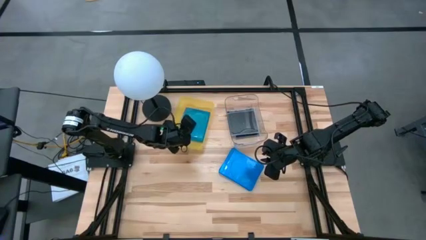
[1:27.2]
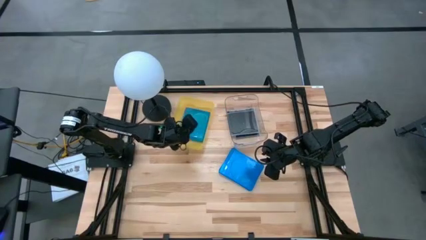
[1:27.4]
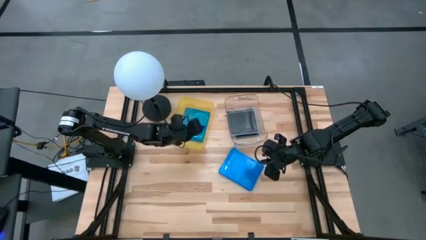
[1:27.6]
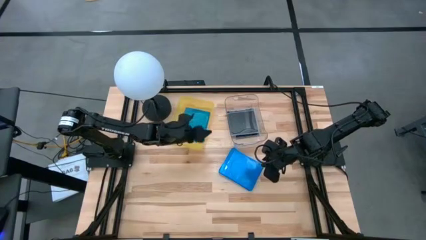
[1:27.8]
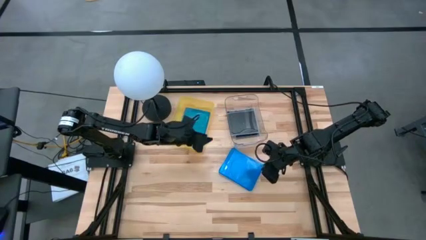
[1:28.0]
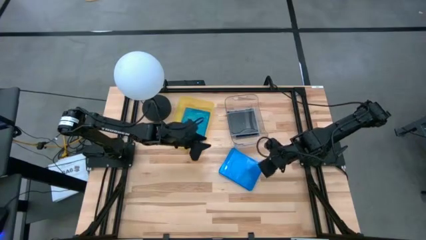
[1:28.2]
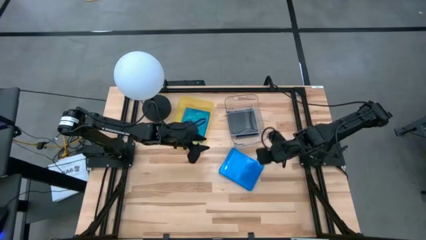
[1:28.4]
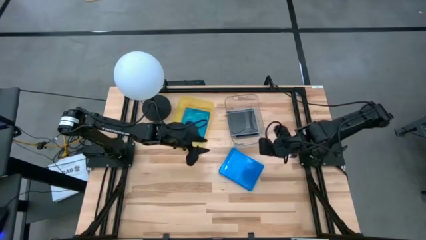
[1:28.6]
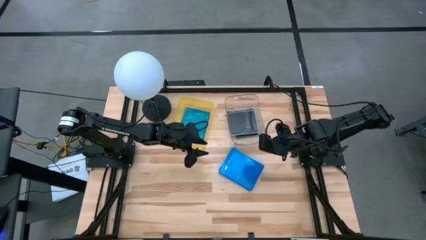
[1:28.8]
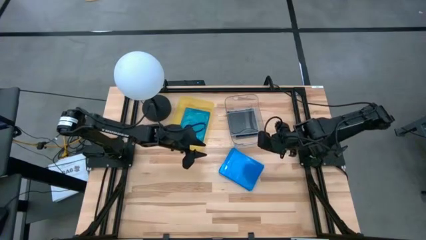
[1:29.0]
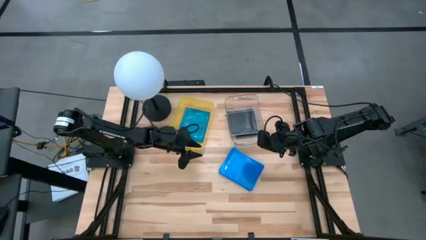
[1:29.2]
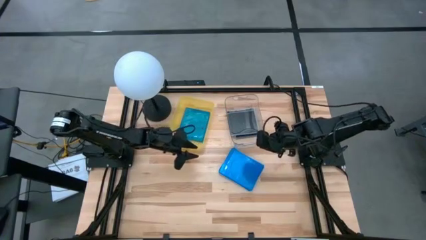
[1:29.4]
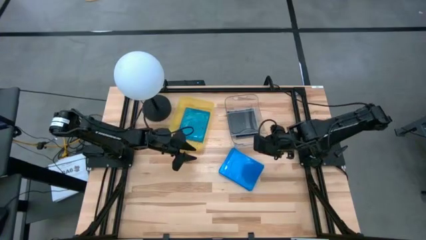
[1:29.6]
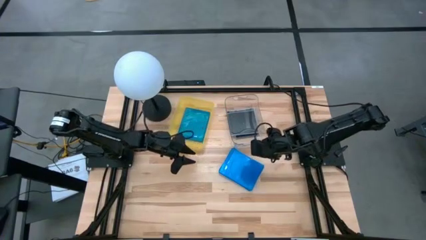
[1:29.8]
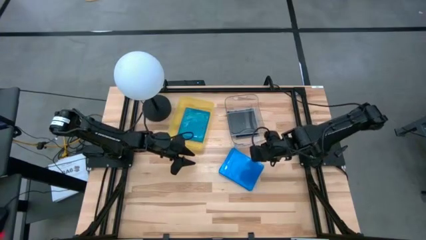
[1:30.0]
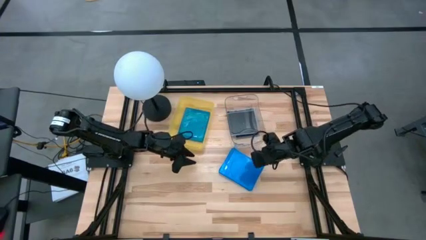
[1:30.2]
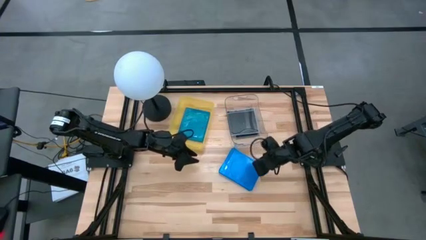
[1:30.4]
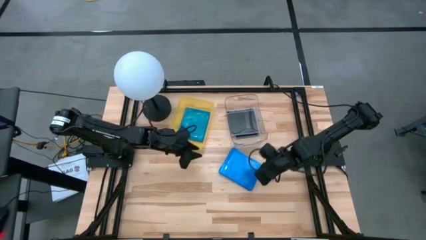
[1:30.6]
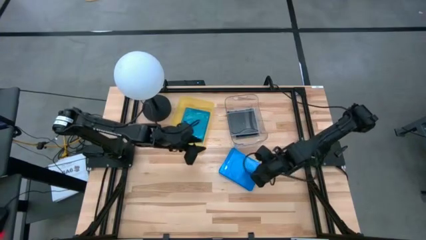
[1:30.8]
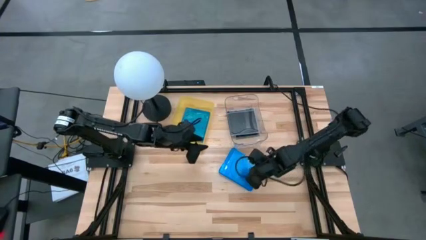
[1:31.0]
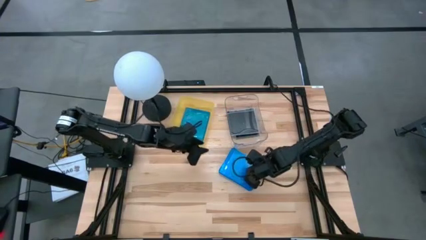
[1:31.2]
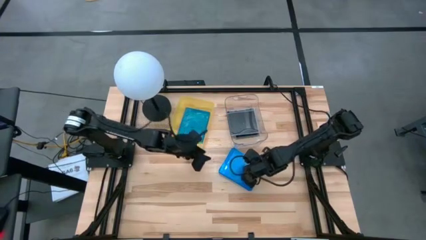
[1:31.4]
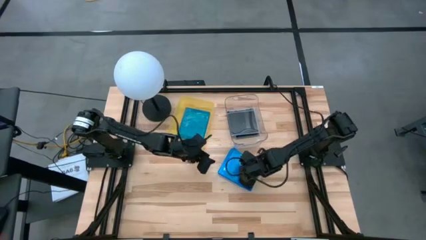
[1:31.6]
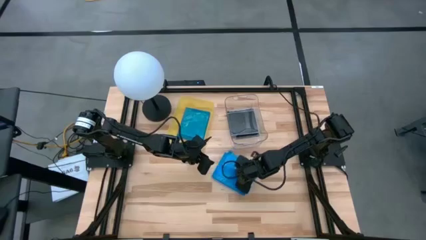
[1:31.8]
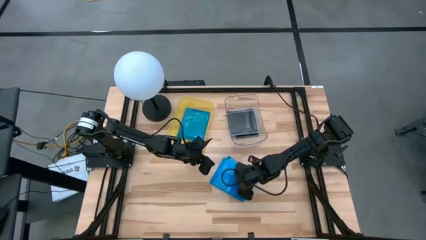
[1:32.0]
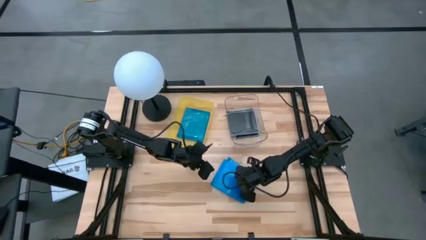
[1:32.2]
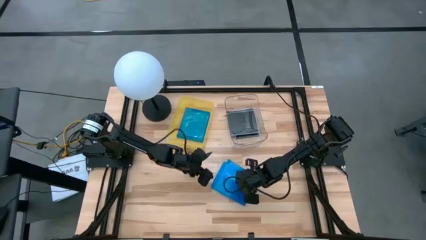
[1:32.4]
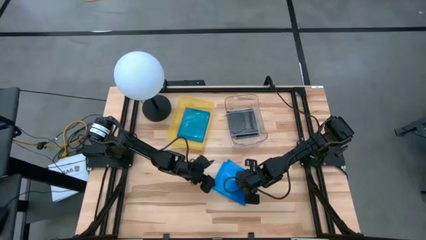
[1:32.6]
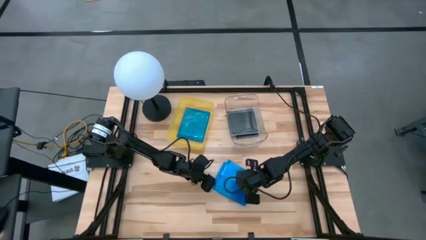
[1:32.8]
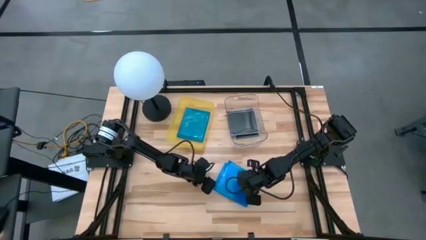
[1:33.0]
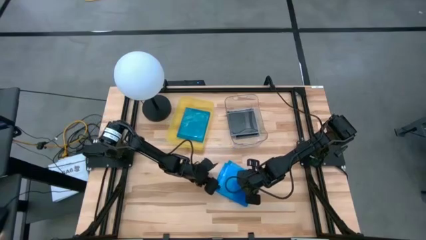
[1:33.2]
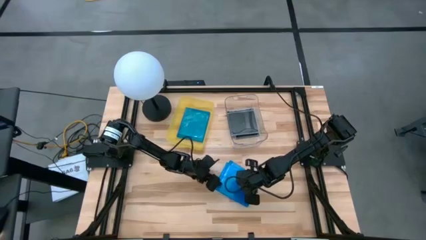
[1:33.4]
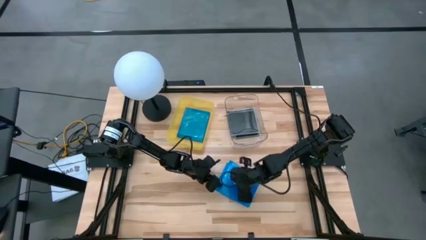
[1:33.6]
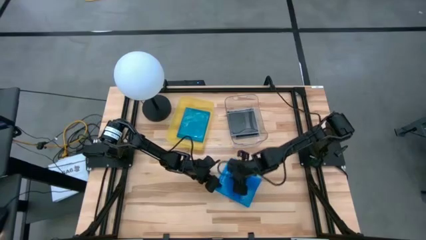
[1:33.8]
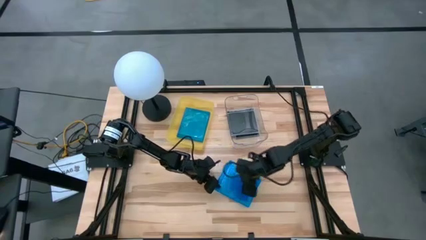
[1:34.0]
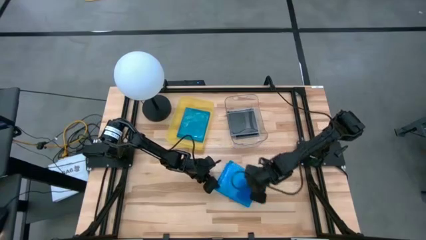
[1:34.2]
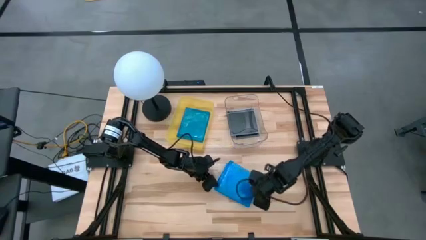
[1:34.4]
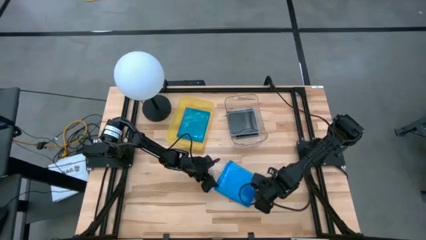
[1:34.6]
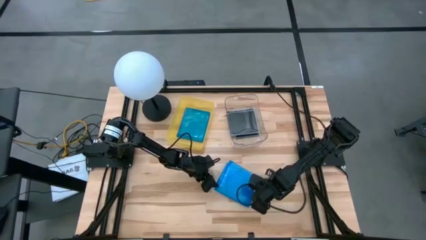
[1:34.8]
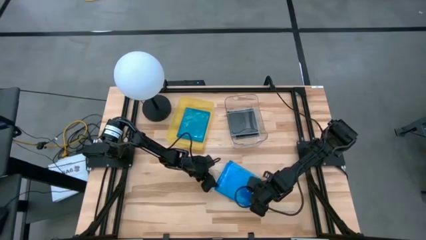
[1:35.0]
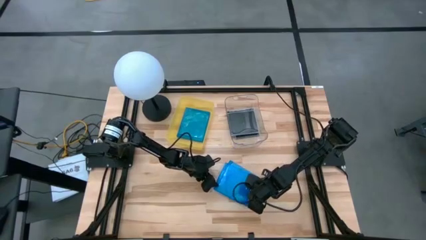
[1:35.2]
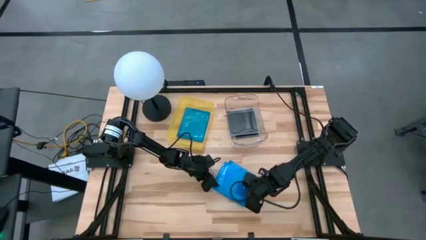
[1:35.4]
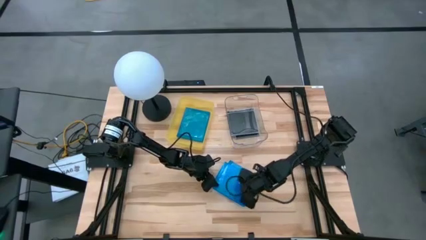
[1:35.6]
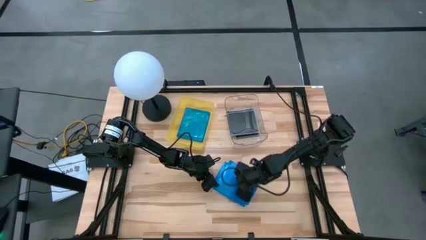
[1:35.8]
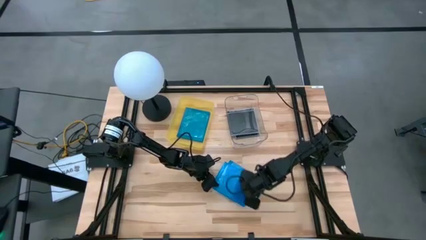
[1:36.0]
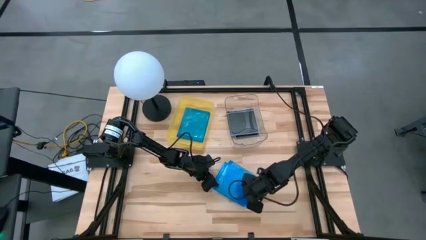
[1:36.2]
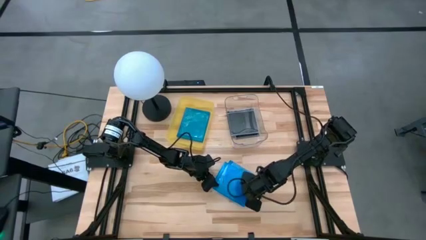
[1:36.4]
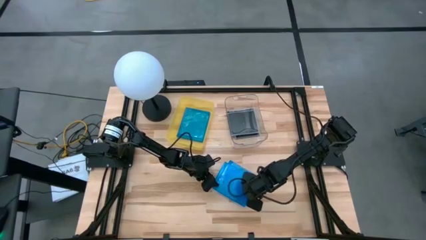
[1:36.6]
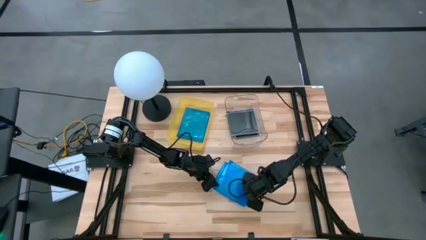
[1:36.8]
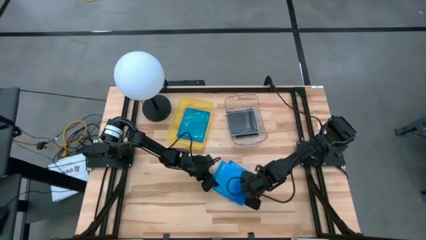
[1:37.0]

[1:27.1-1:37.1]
Task: Pick & place jewel cases by type
Put the blue CD case into the yellow bin

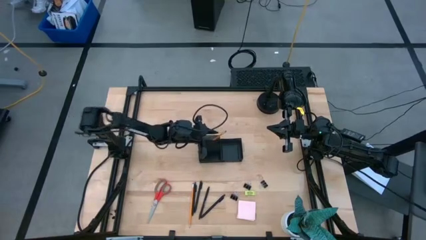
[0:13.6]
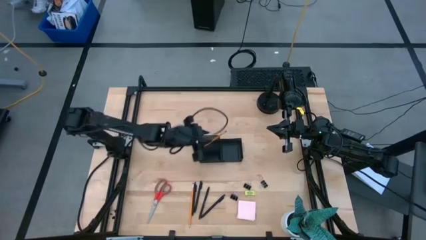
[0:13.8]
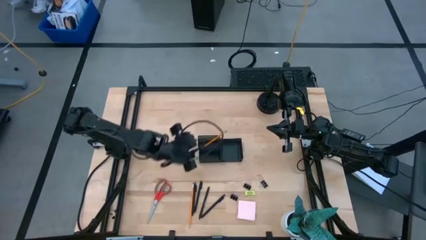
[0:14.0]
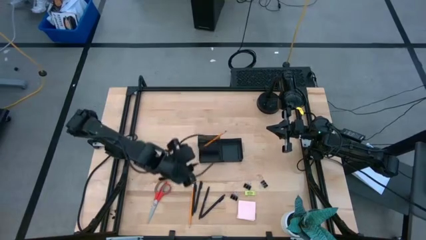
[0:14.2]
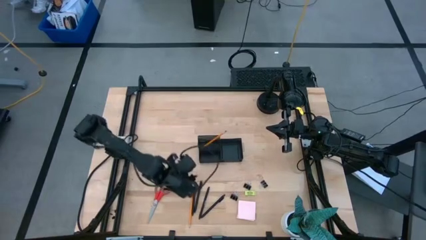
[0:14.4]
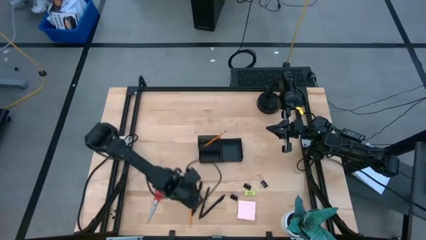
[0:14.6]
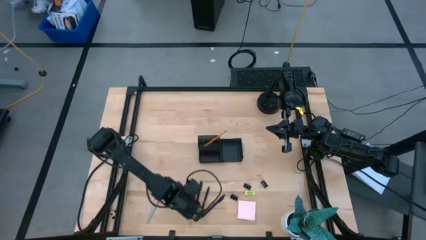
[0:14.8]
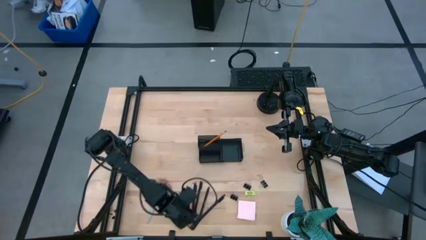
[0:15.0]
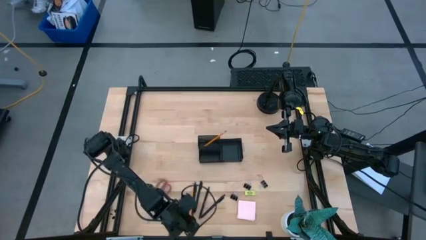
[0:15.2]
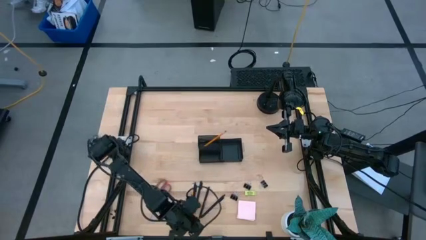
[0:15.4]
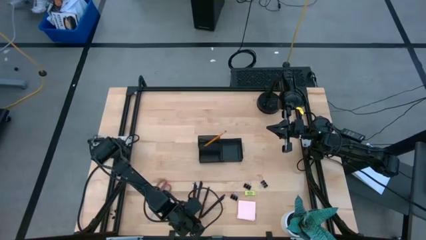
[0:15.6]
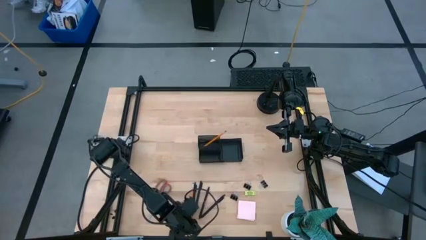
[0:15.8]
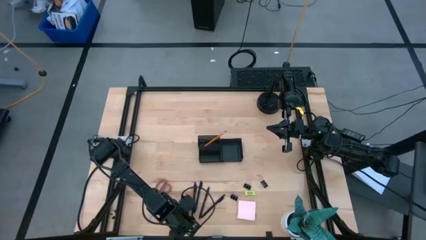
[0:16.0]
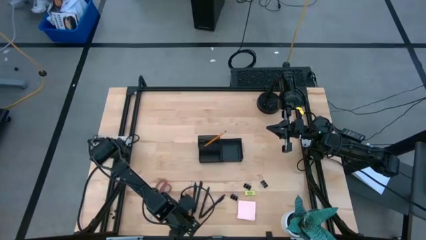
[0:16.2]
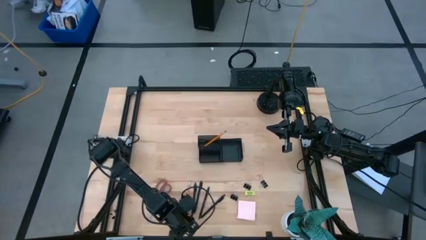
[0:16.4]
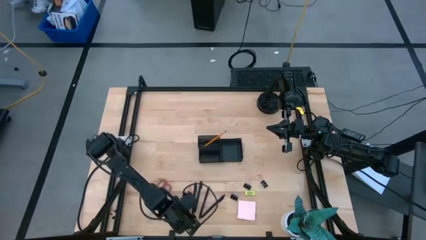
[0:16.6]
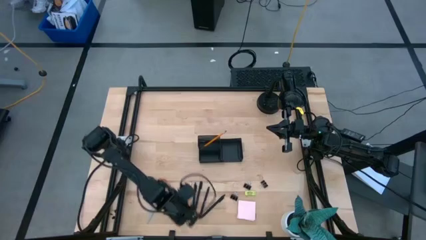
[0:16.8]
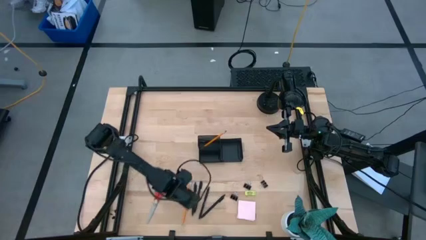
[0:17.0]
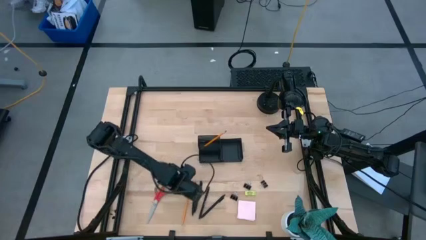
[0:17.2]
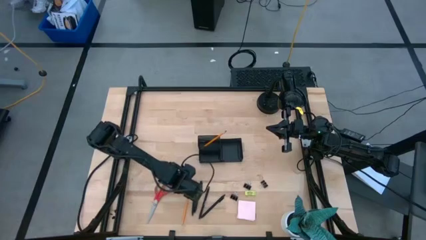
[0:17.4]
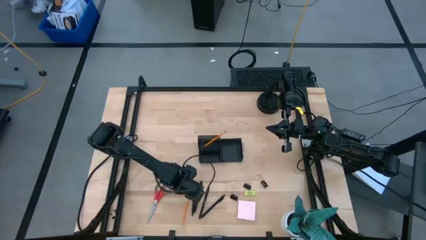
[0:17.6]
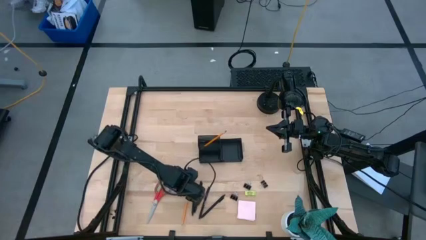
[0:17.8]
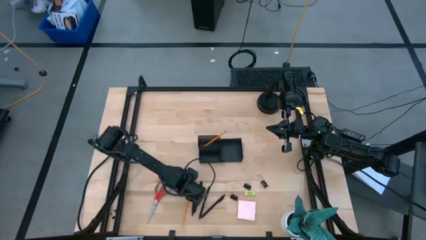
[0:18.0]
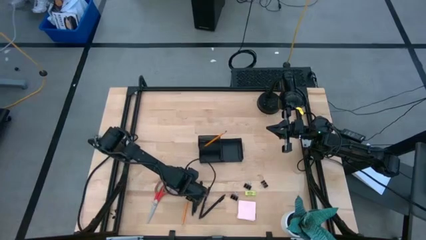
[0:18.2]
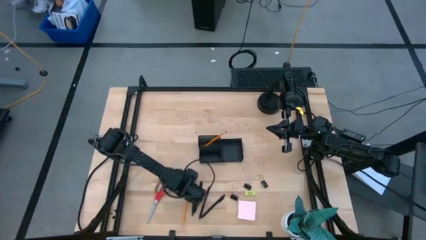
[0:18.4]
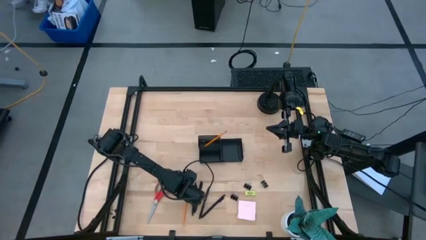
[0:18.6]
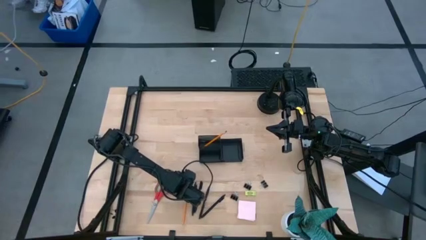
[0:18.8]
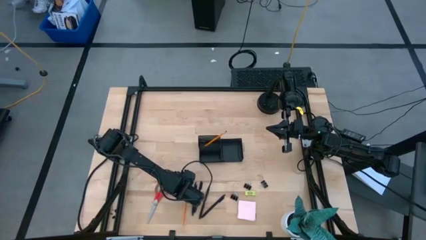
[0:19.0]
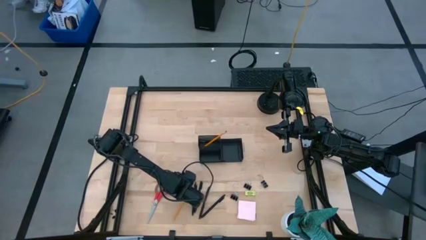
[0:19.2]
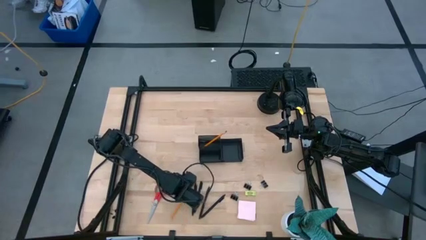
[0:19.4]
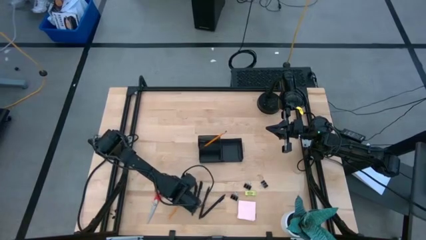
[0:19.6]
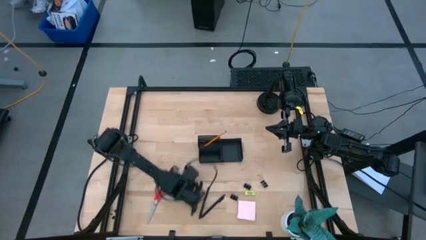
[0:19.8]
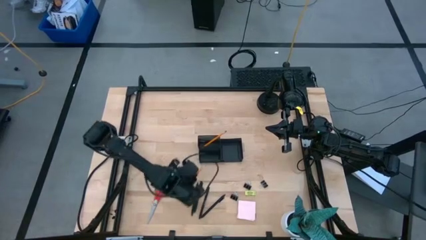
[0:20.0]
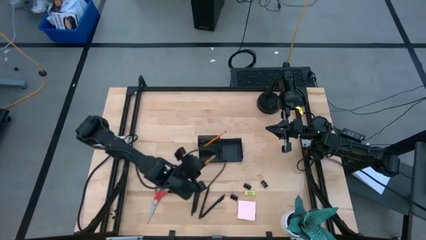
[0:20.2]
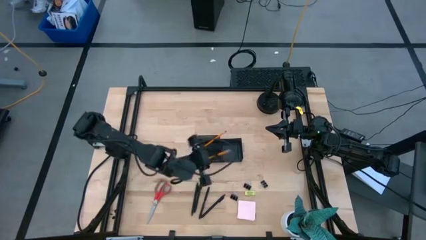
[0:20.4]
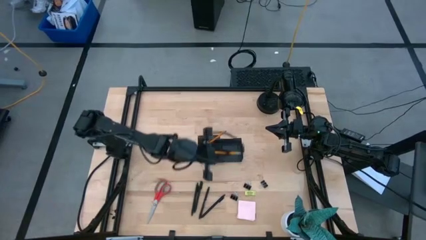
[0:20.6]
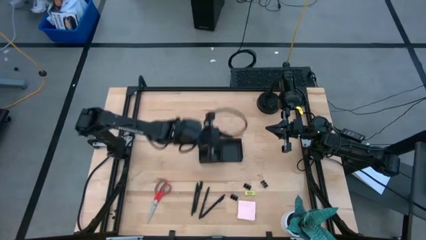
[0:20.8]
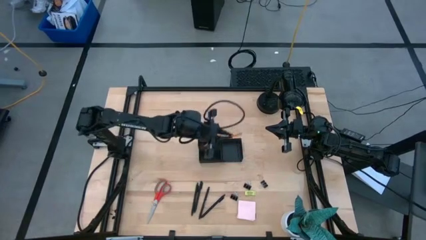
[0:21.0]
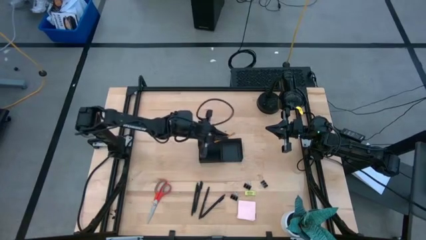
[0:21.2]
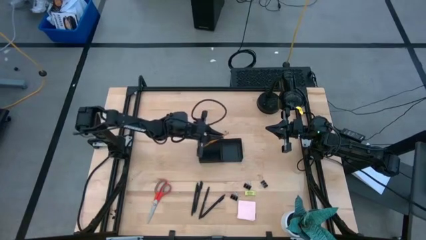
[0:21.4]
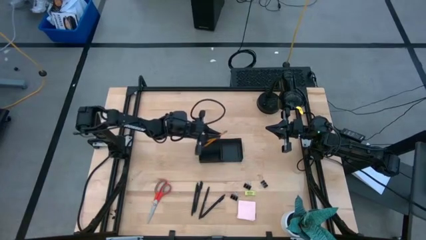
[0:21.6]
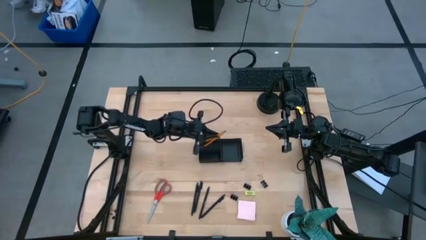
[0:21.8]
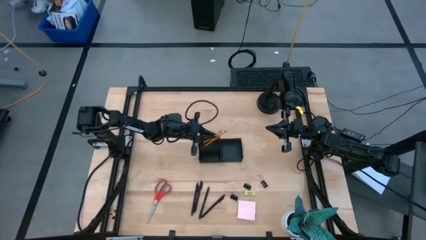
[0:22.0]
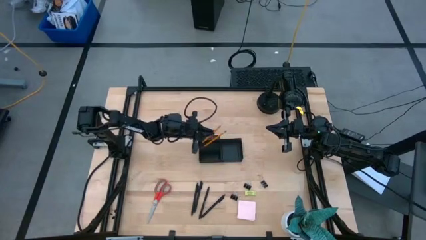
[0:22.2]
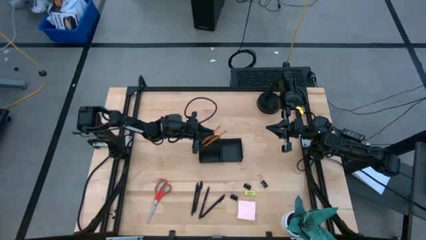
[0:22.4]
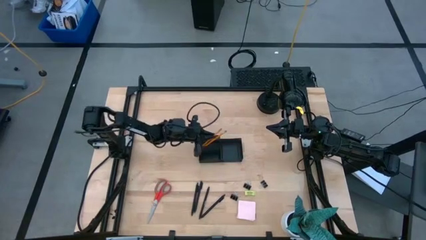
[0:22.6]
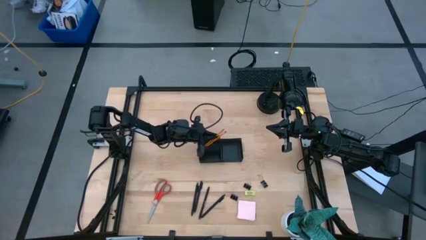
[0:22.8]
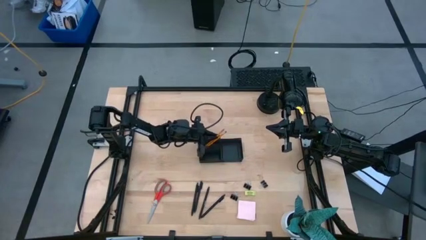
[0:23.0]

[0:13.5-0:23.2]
Task: Pick and place office supplies into organizer
Put the pencil into the top left section of the desk organizer
